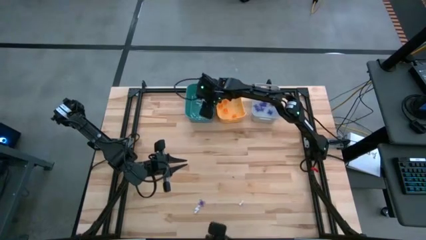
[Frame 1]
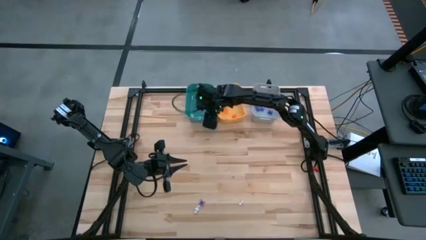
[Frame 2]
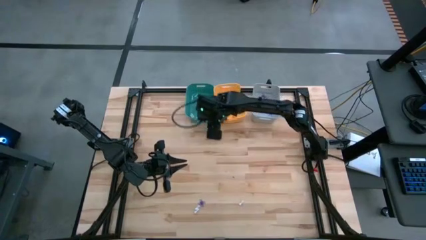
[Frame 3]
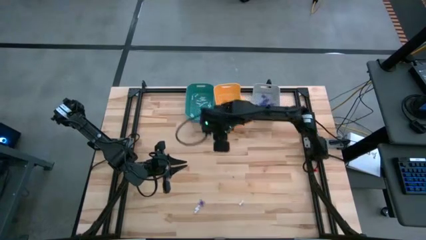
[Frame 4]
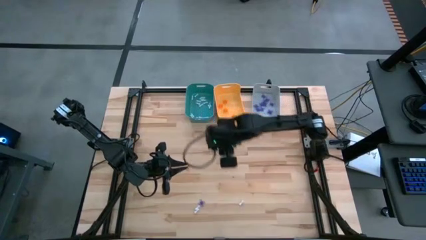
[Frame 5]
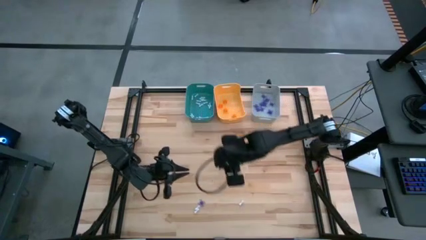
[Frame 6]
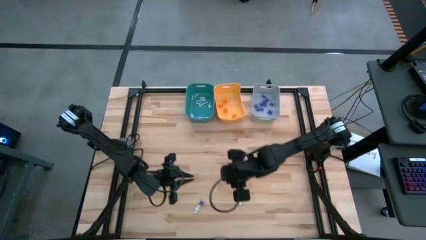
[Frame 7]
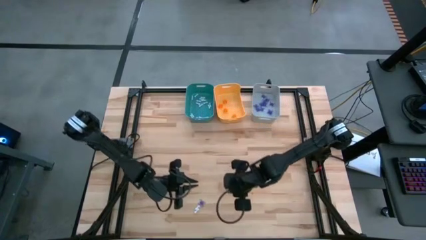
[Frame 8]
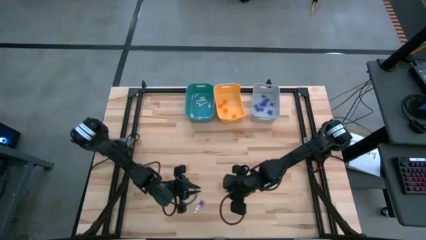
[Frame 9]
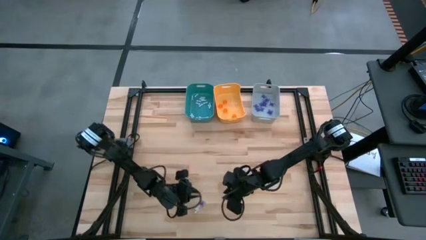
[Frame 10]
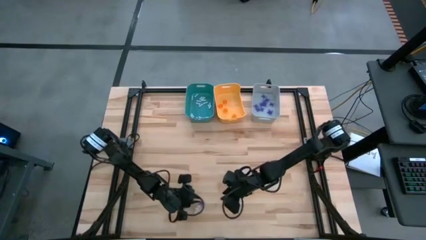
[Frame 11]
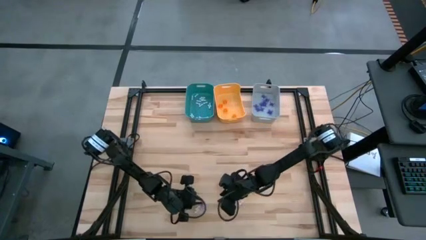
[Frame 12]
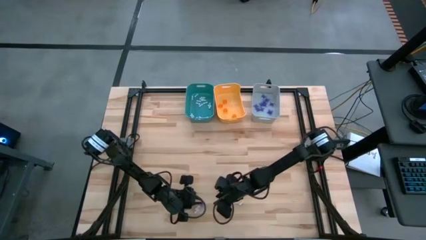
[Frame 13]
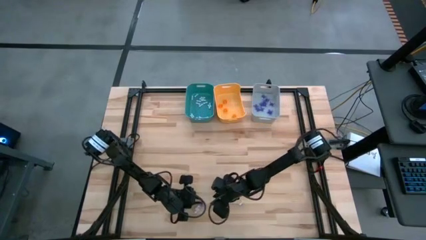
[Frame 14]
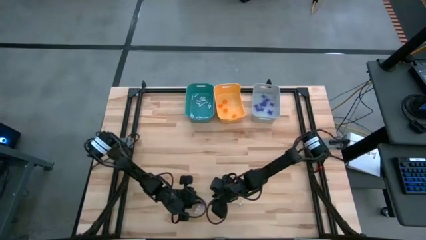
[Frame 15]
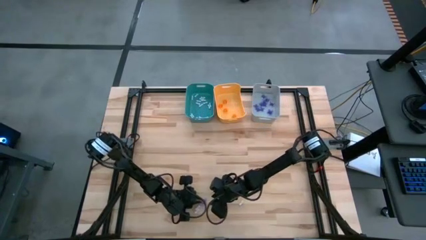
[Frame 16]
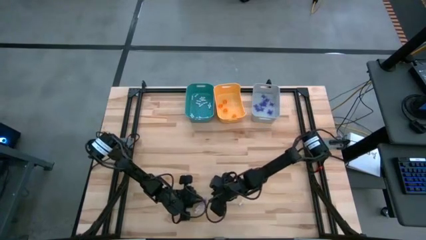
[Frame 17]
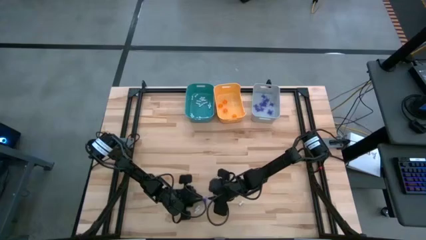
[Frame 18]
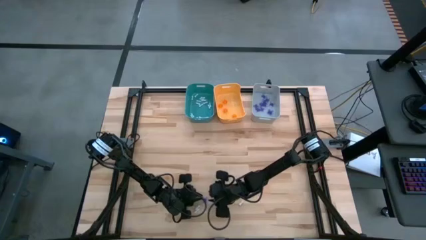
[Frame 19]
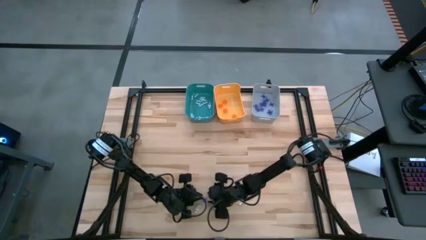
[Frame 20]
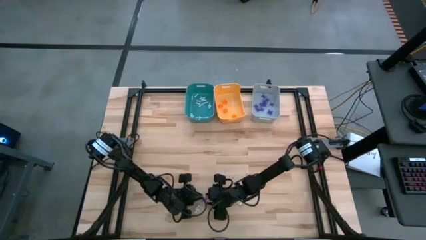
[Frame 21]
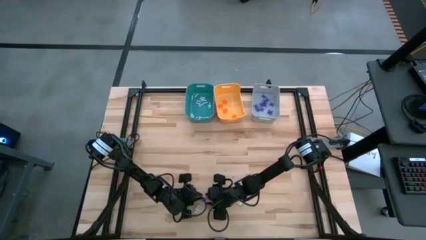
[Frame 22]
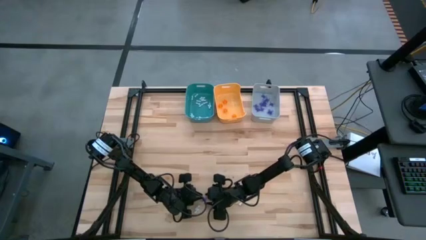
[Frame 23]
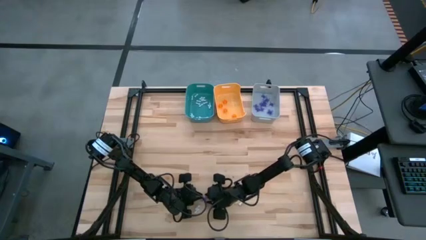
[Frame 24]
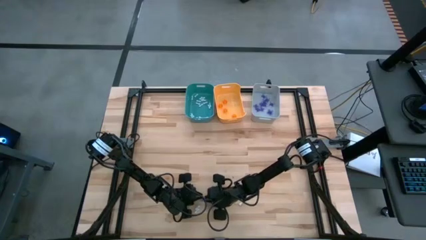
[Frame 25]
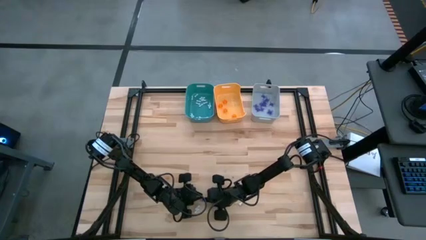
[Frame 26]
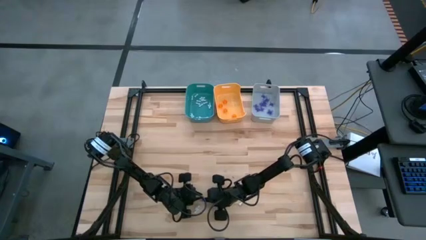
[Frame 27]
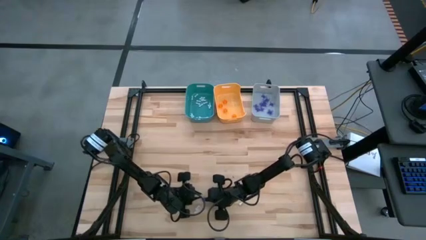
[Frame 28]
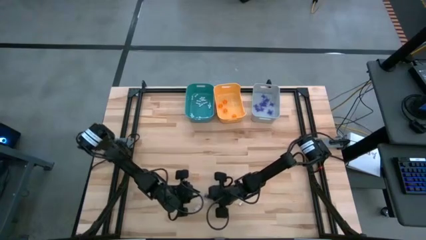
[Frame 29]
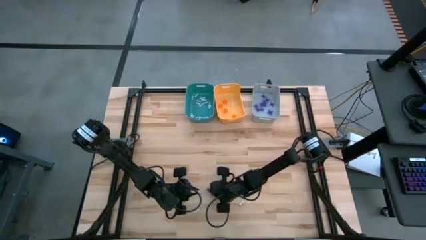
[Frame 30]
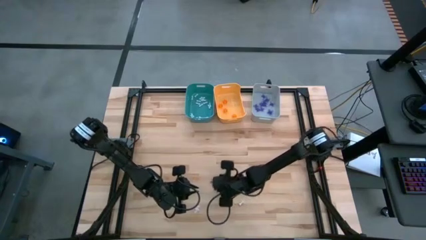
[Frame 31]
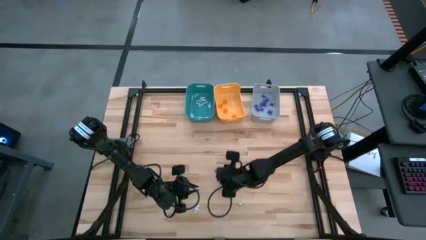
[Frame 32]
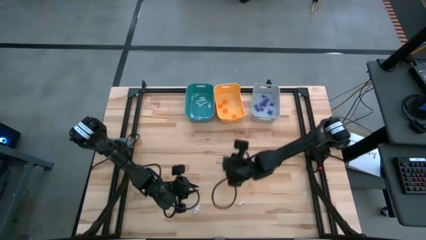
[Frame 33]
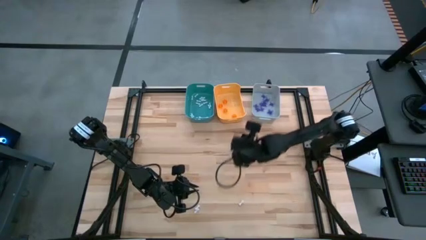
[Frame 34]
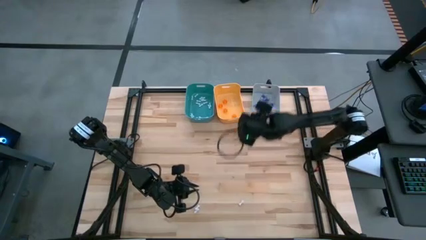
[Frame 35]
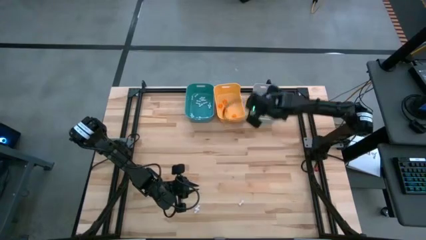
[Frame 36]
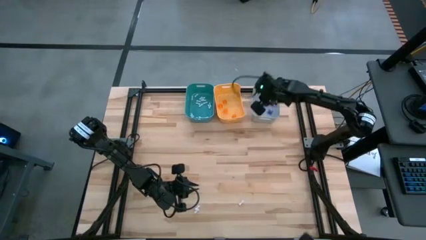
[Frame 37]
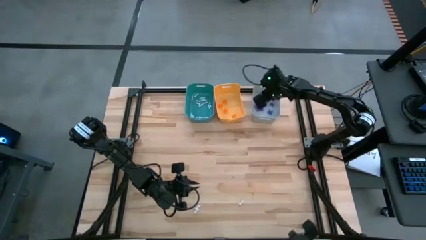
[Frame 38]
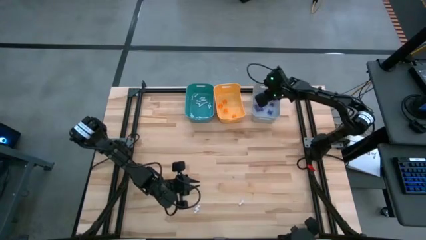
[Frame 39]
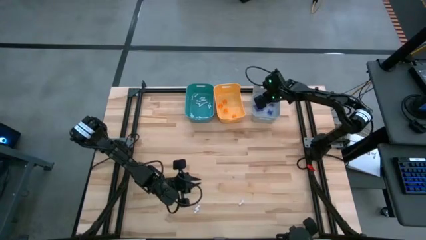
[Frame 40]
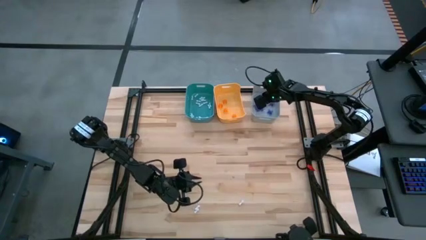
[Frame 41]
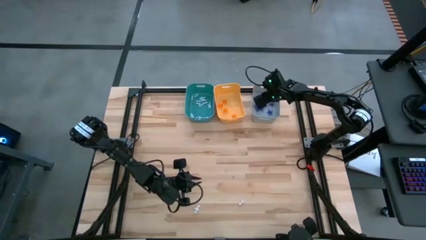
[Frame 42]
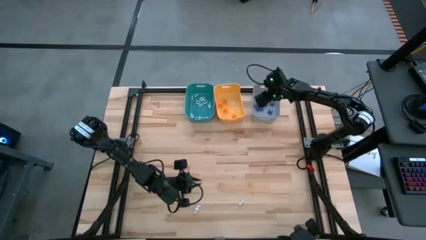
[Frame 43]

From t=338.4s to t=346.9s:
Task: Sort Halloween decoration
Put the purple spider toy into the gray bin

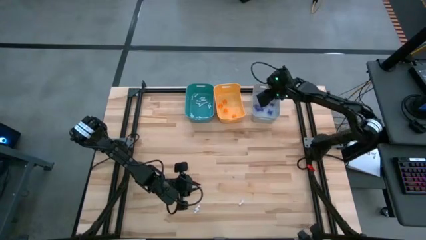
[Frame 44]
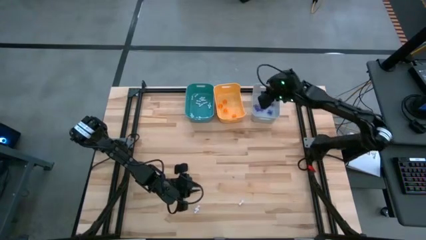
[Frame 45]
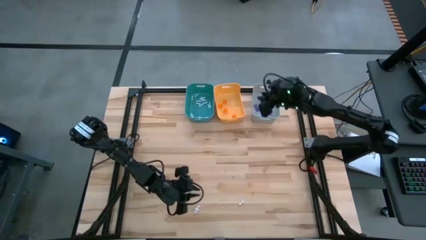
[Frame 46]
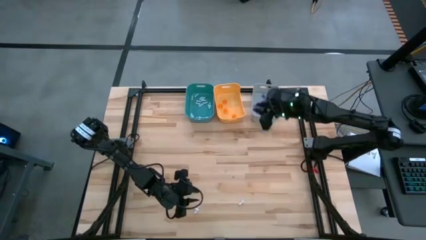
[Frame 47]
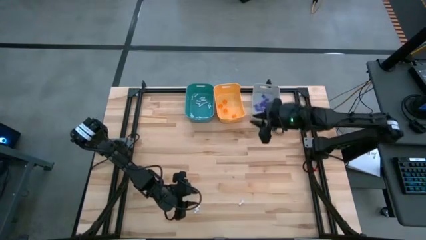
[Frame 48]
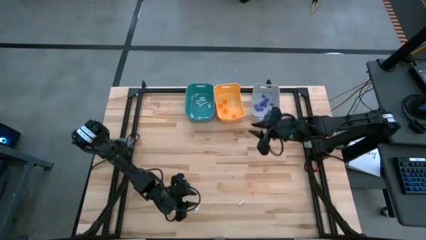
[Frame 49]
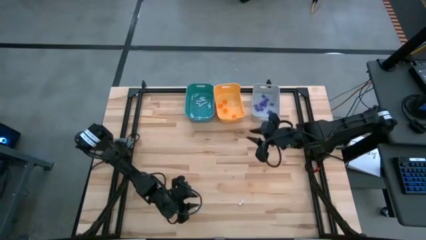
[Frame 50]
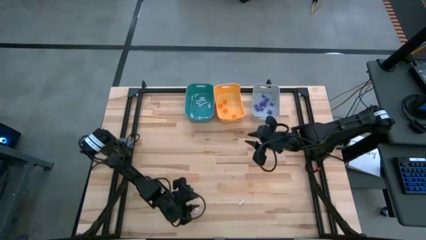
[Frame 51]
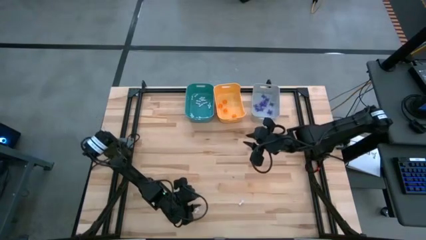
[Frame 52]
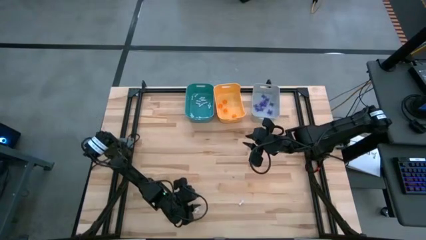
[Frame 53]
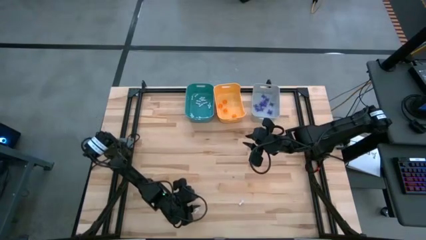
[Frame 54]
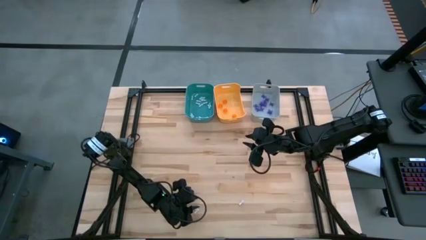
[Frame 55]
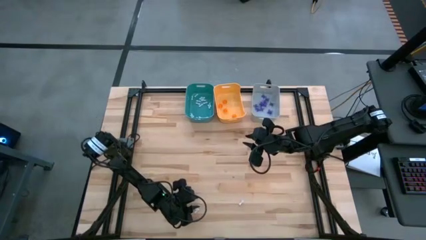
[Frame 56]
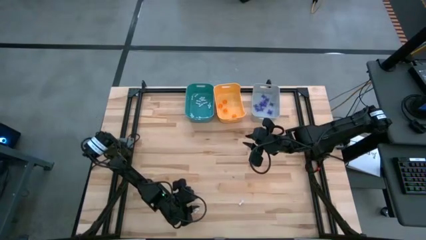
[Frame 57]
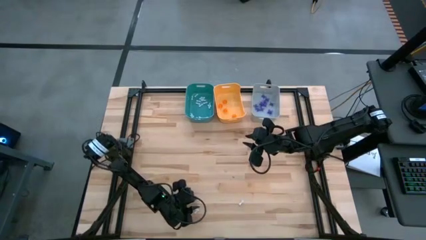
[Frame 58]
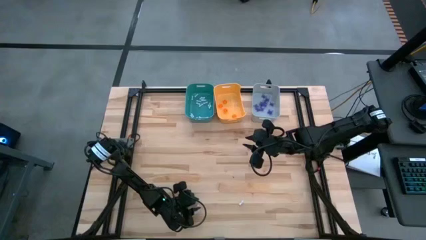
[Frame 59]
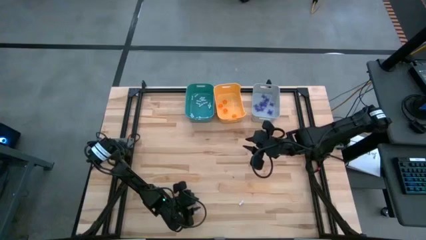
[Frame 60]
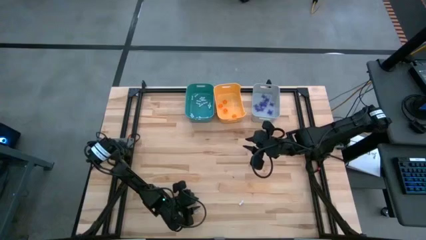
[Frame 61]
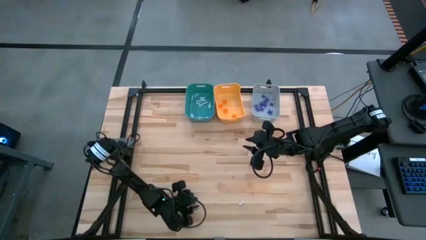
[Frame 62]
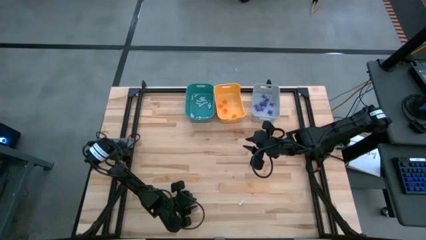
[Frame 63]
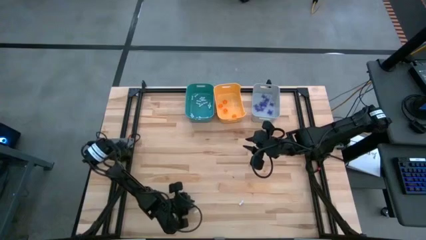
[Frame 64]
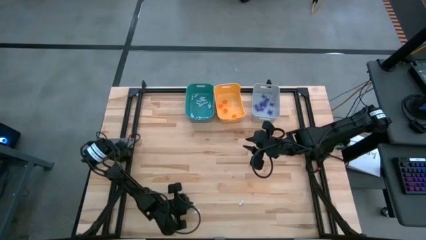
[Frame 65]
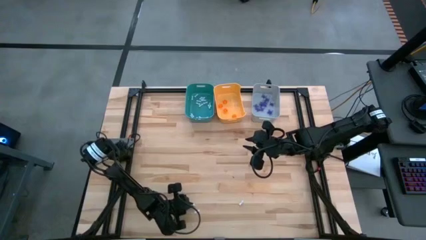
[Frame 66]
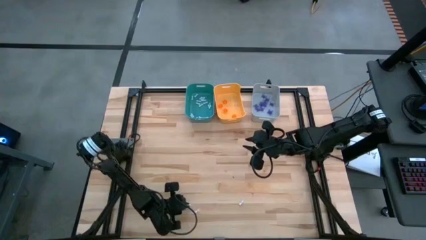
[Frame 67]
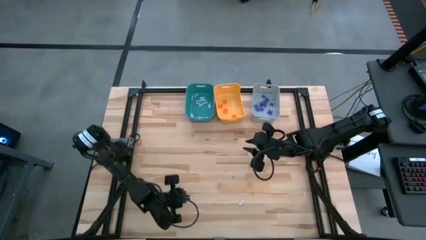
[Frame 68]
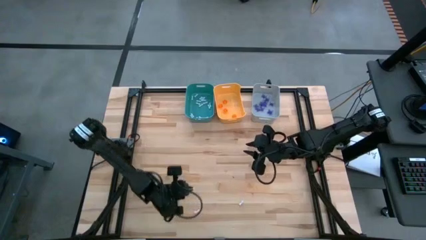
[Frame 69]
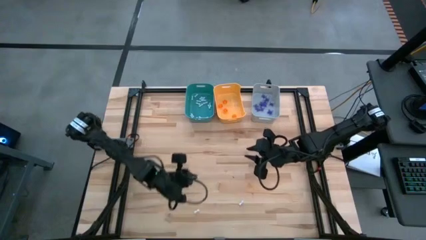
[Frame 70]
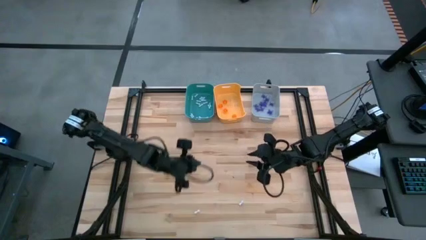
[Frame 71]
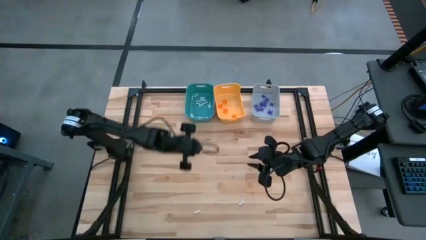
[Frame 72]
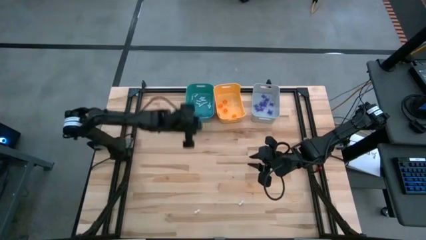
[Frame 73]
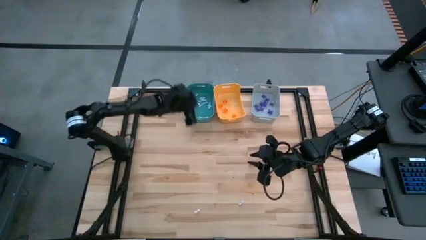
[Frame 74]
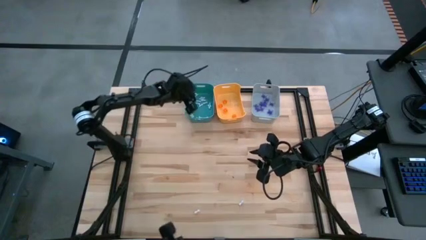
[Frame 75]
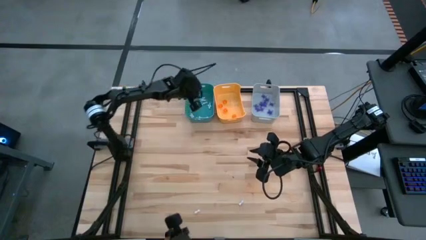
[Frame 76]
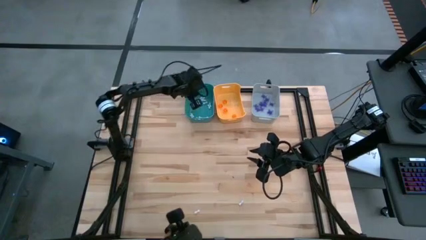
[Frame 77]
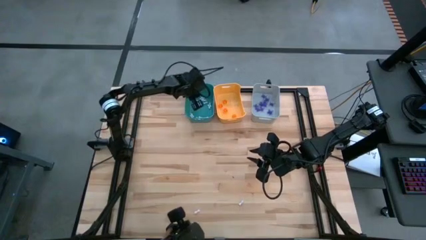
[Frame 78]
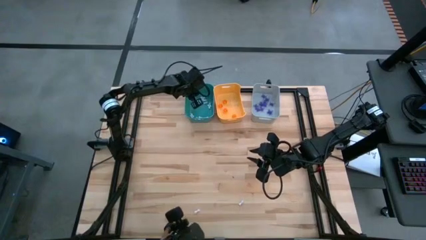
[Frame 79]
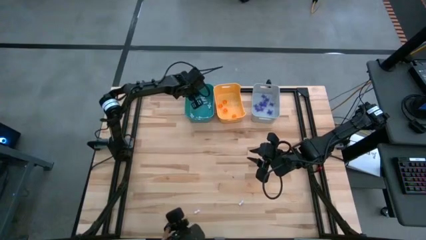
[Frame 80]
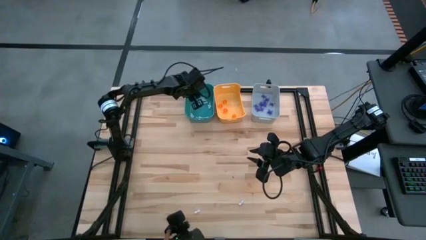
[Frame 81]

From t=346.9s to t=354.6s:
Put the white bone toy into the blue bin
